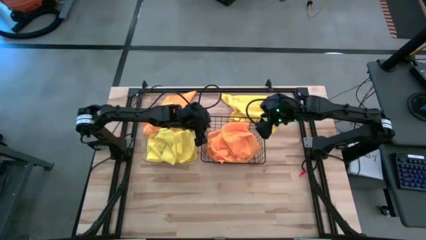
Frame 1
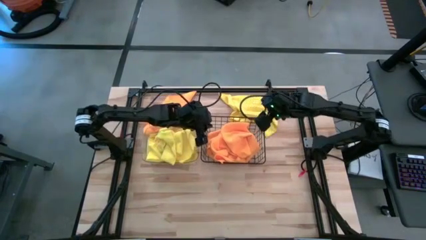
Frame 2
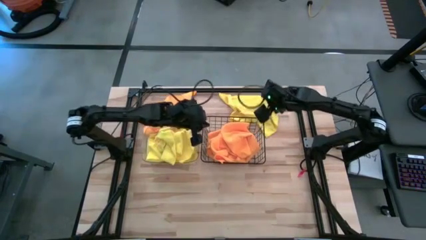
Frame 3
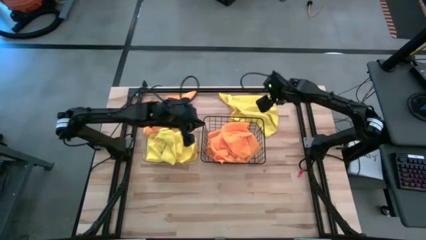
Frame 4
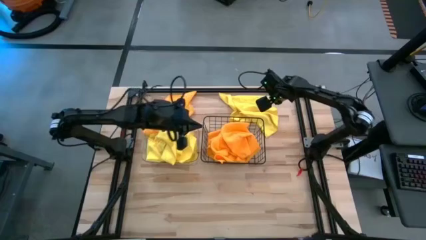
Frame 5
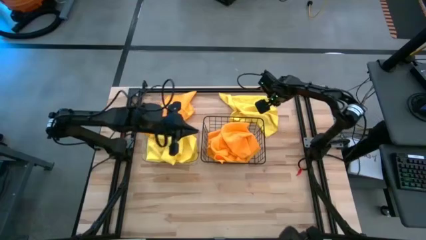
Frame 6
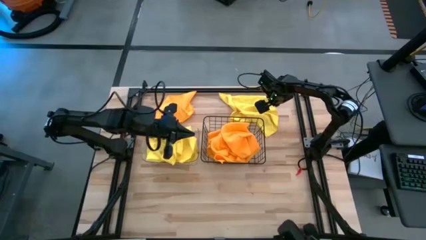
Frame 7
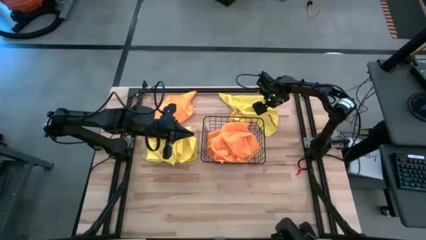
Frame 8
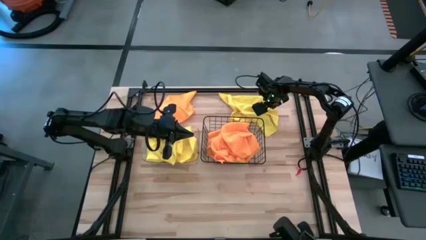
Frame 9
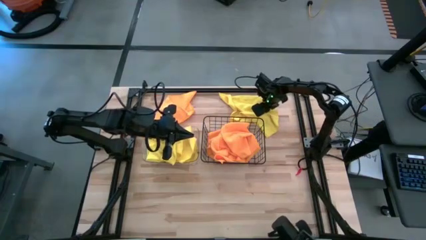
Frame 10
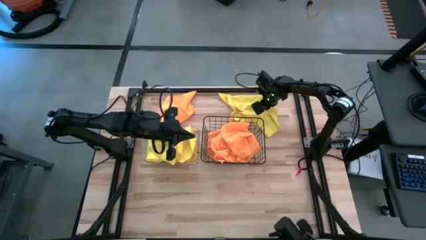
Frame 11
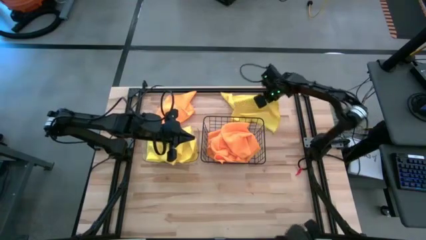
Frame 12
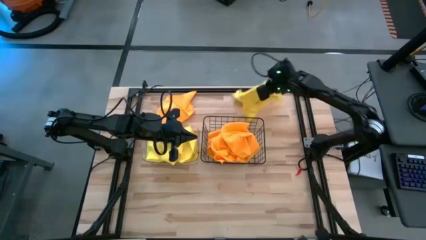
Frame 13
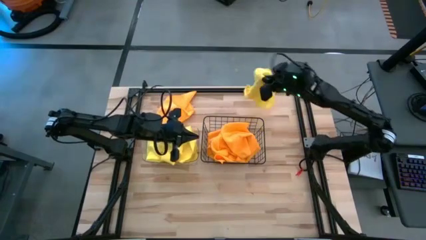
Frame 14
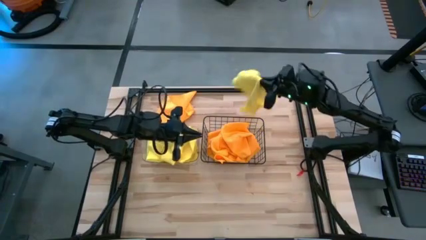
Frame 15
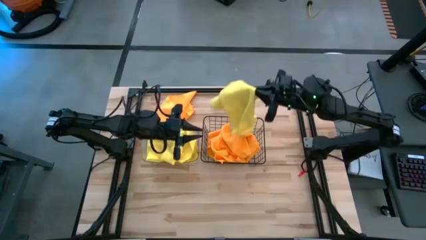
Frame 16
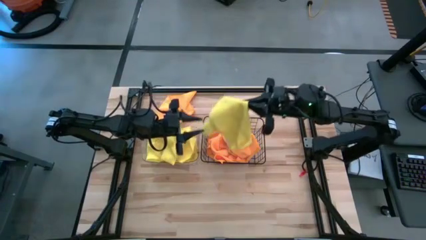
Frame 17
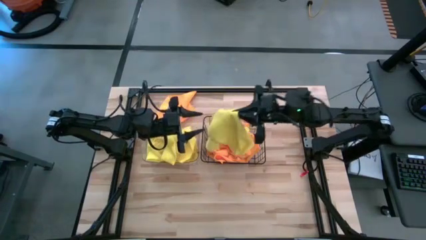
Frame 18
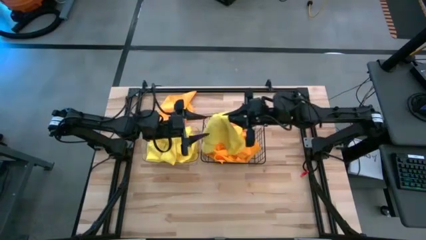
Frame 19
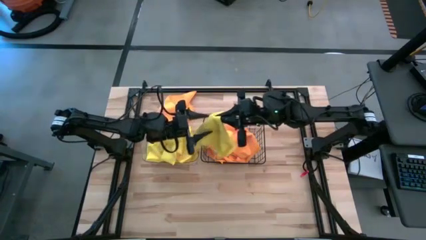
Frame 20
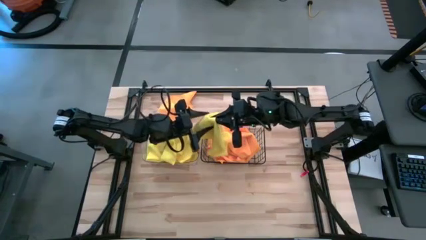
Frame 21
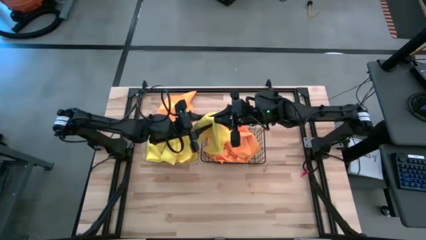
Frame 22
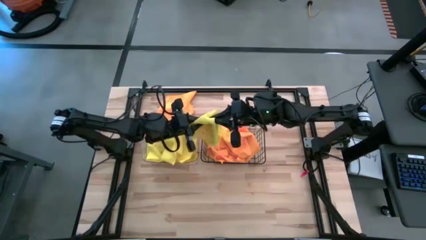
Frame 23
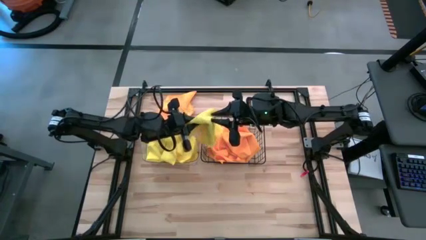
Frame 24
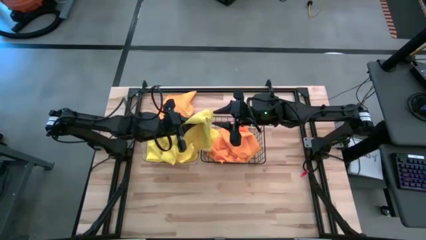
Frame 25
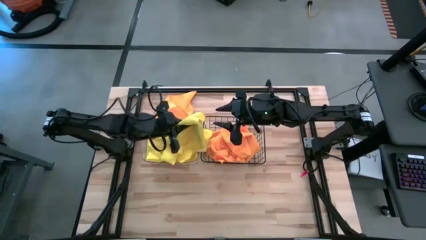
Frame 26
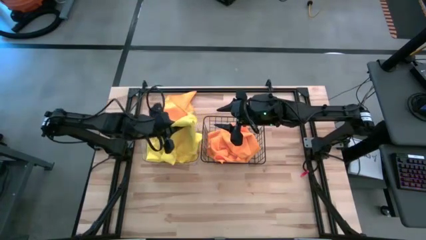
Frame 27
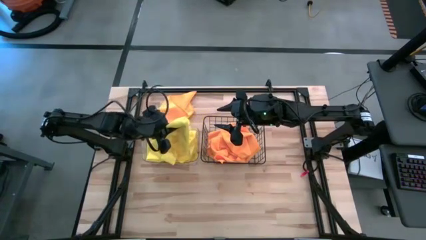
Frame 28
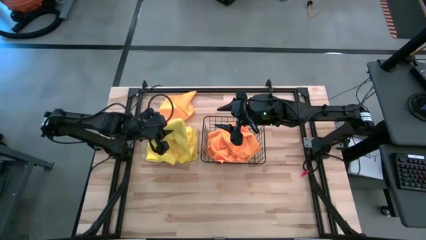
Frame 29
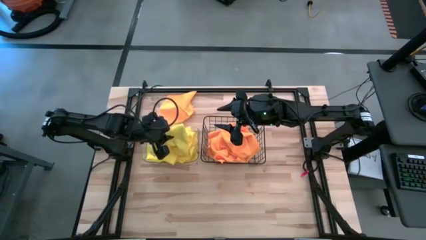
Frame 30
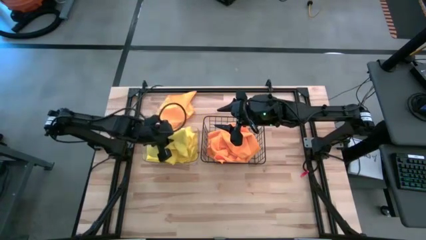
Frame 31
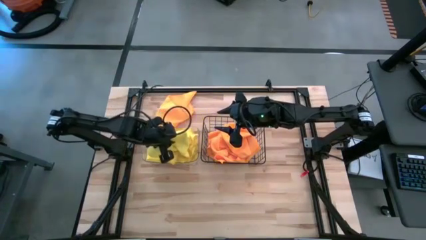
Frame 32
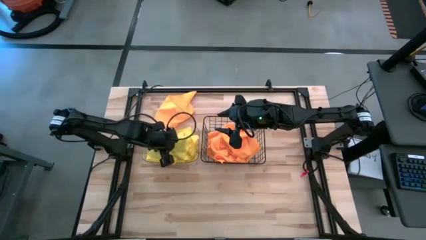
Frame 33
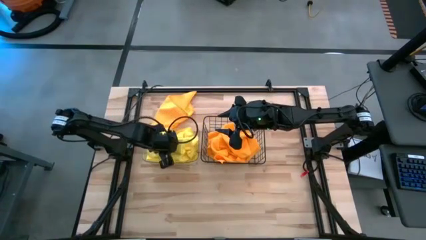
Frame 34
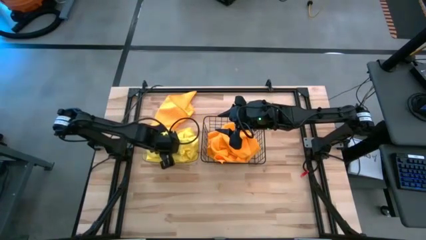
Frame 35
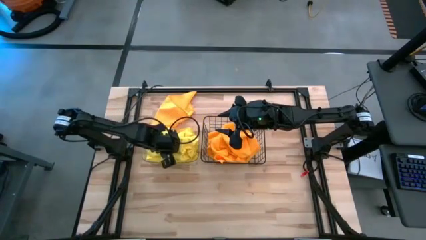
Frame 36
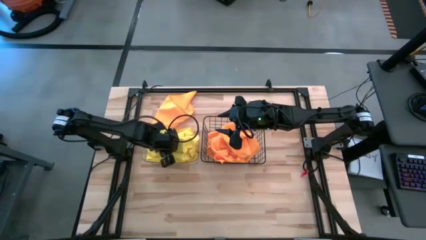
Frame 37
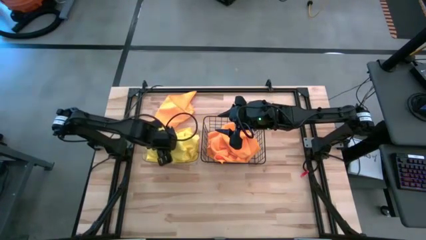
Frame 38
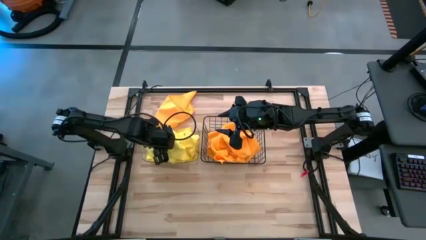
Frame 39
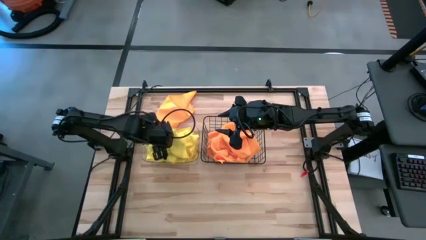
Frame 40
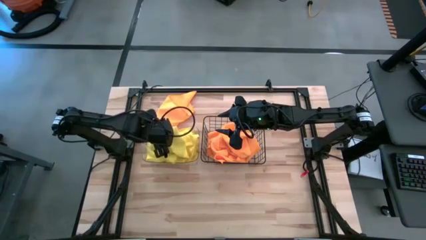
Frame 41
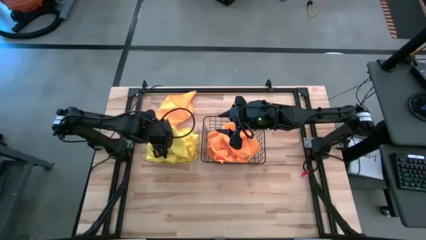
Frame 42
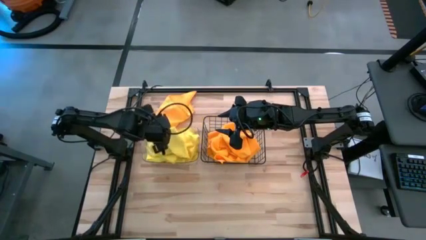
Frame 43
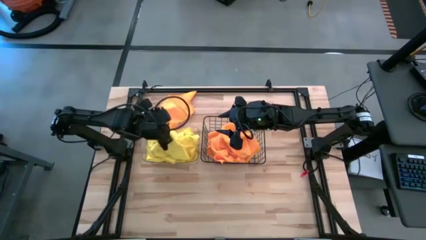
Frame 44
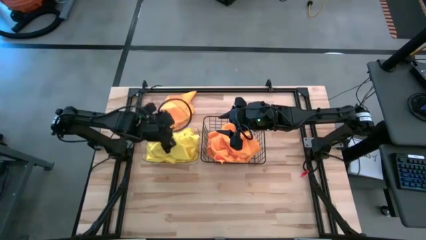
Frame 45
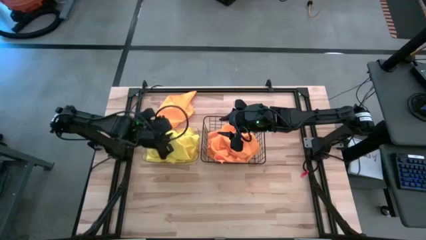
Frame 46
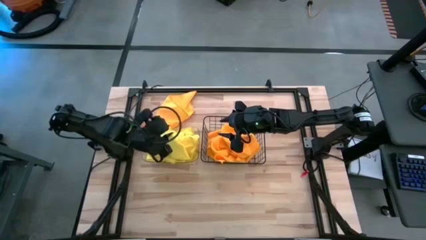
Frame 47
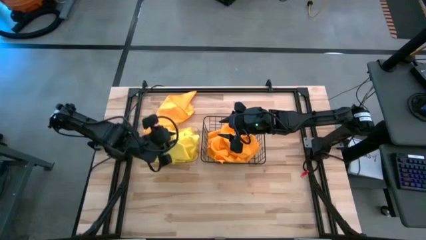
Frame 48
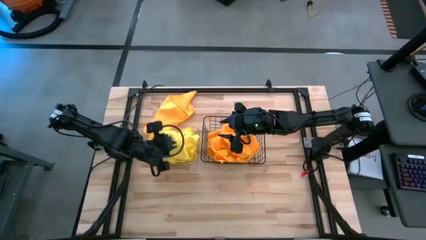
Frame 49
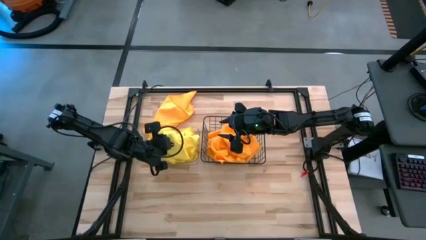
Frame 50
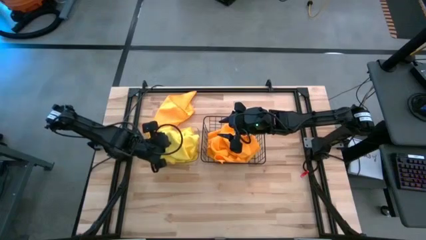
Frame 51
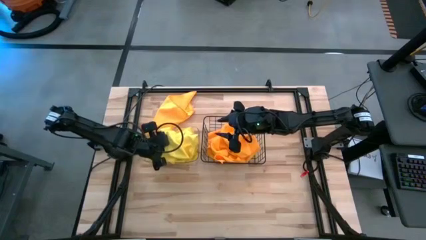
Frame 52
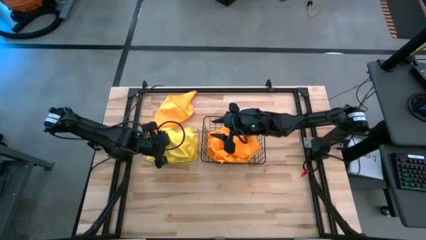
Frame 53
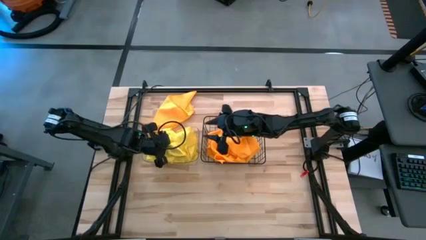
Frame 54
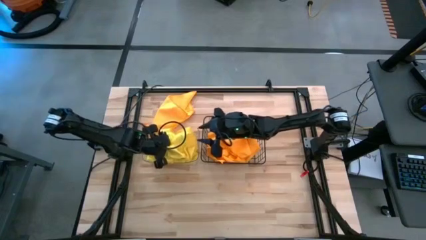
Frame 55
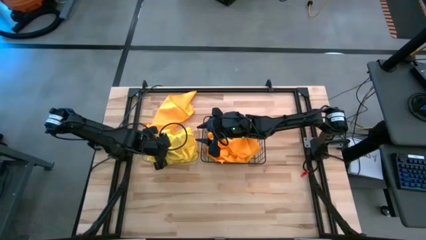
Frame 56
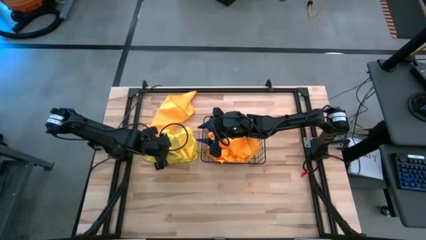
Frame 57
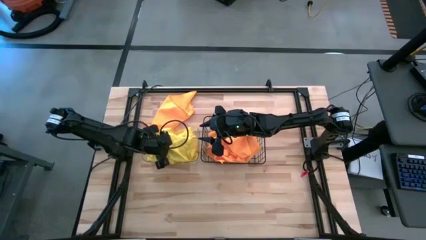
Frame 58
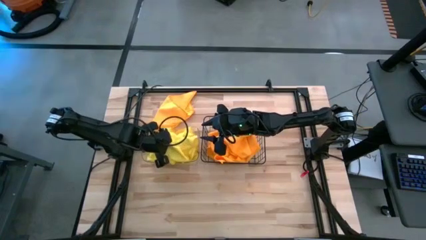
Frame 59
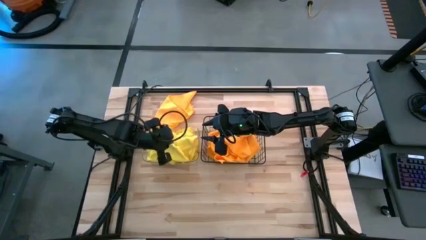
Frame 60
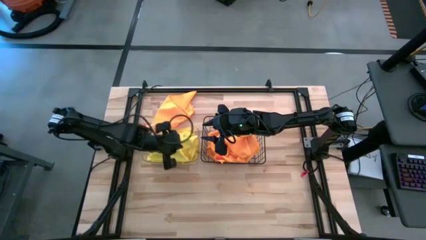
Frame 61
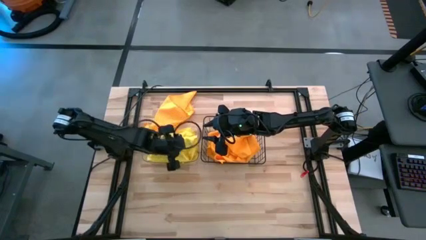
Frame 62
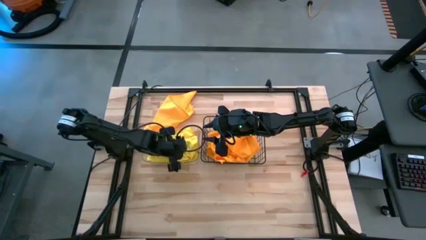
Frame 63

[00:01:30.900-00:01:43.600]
Task: Sort microfiber towel by color & place in baskets
Put the yellow towel into the transparent bin

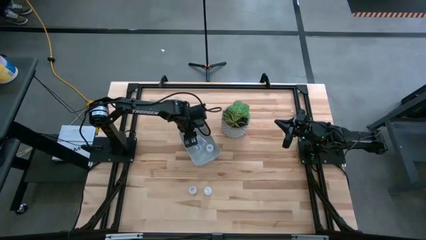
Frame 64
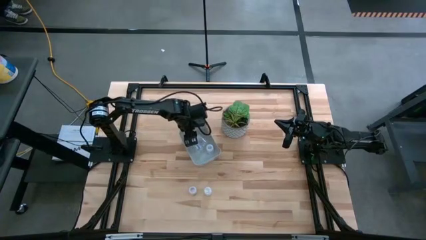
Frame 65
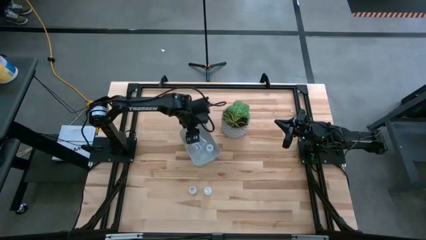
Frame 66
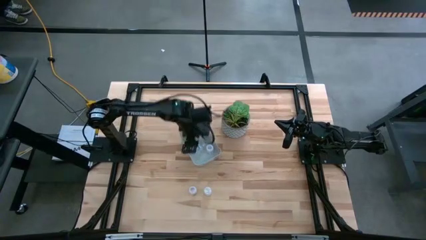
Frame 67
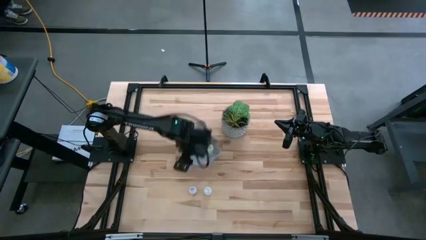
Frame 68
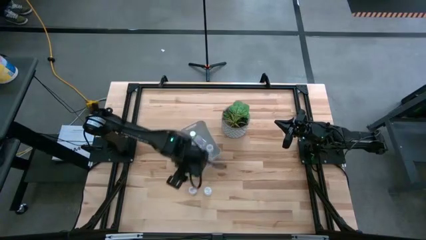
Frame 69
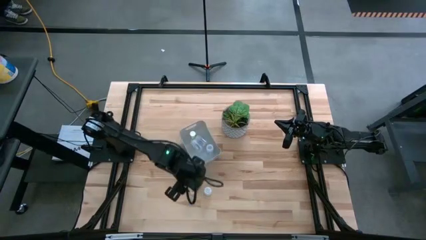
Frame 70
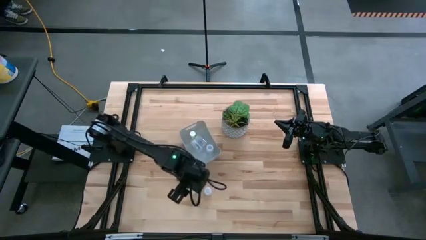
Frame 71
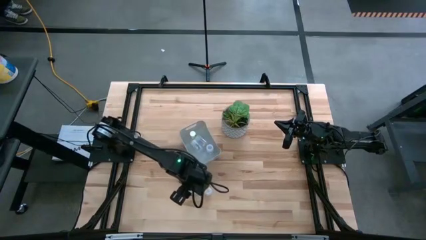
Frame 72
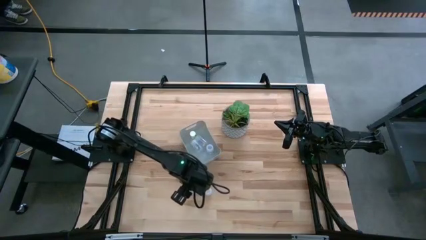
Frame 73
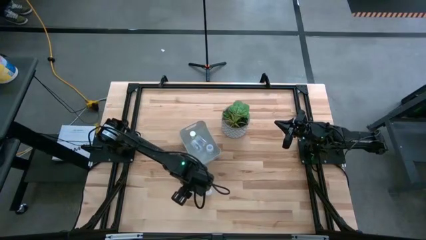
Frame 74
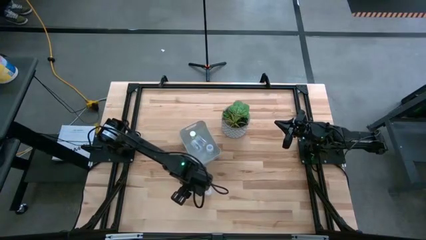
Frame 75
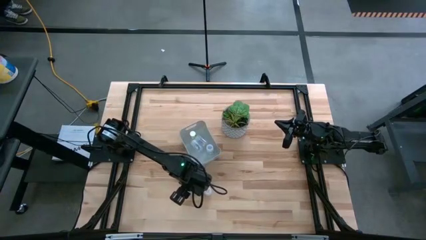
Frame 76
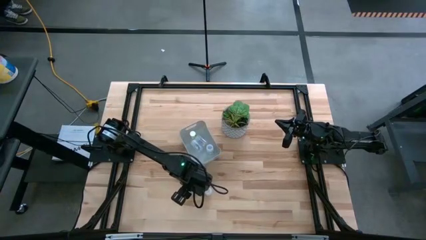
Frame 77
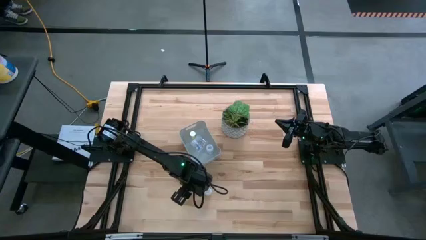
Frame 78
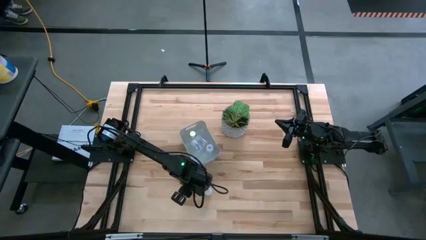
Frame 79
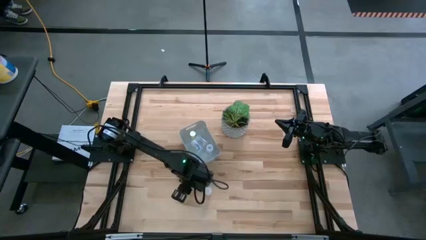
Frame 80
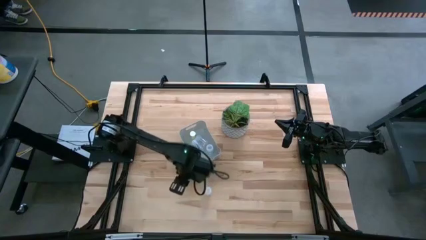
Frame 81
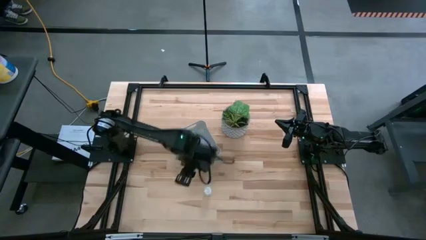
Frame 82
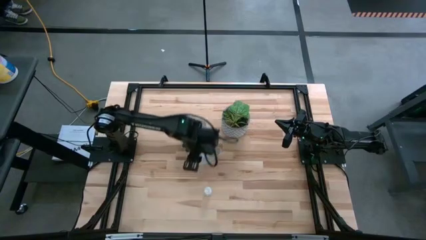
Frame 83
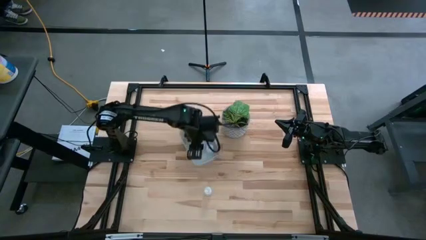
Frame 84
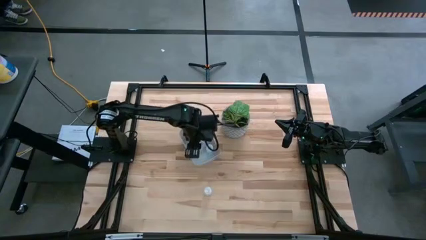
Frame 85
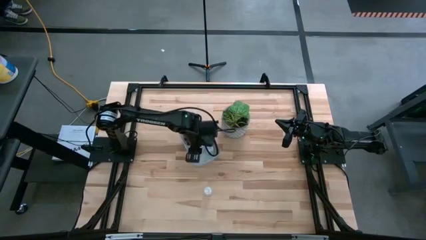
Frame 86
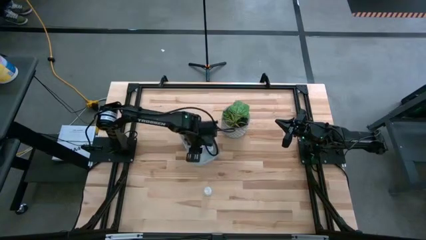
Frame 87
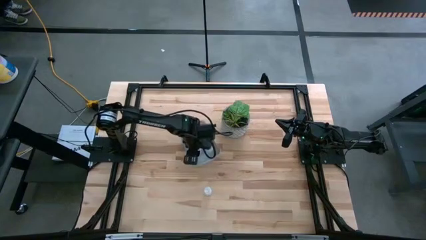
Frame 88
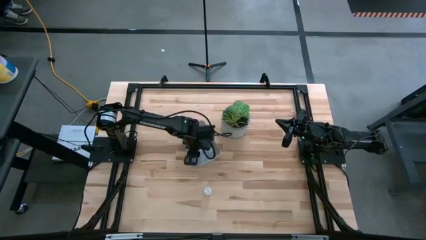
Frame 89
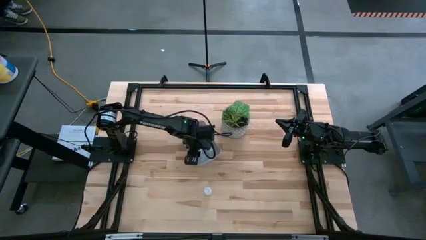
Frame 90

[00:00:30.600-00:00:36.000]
Task: Pick and place pill bottles into a basket
Put the transparent pill bottle into the white bin
